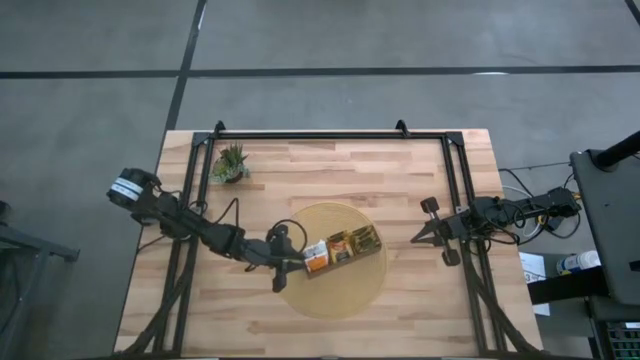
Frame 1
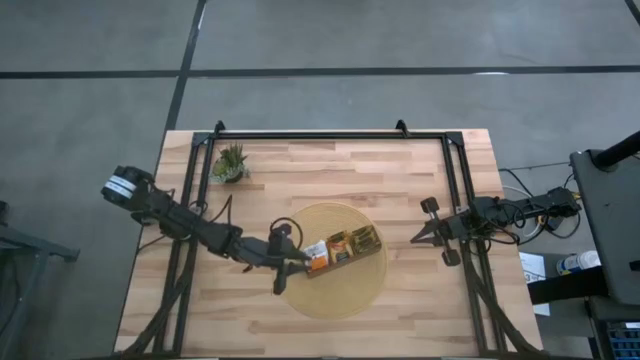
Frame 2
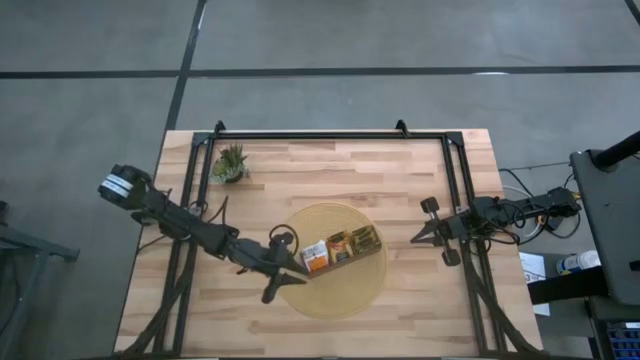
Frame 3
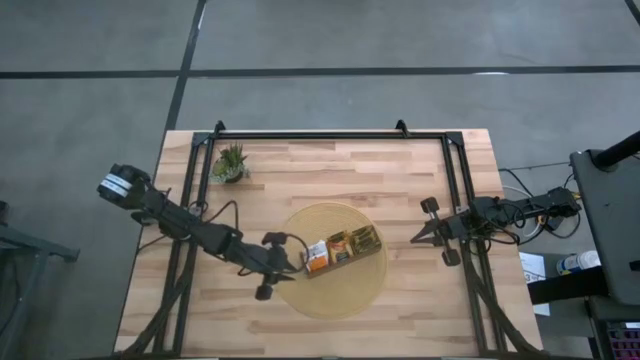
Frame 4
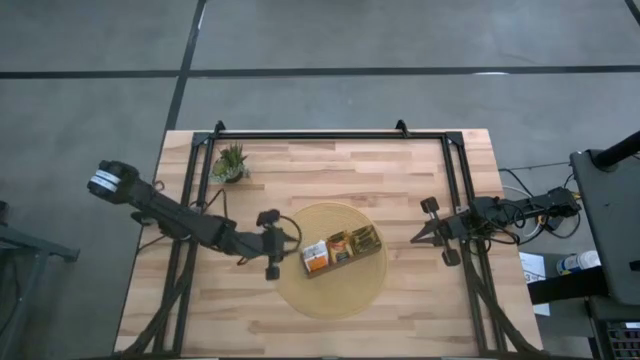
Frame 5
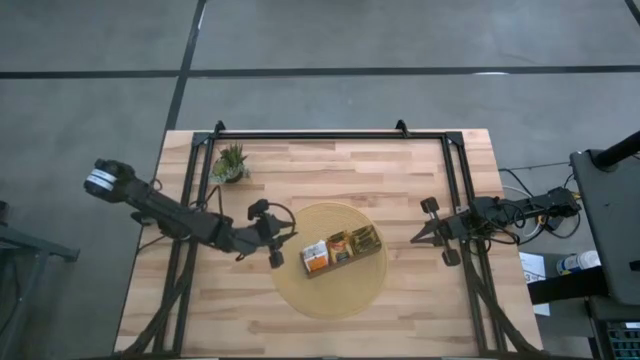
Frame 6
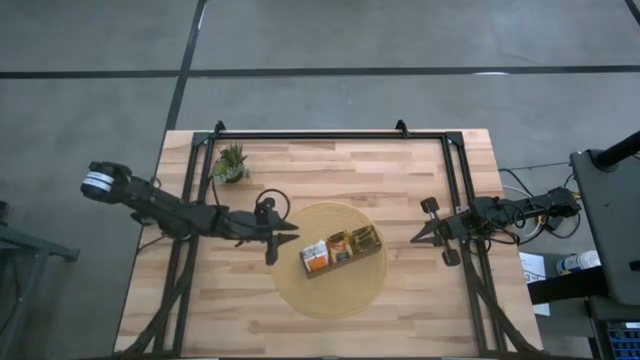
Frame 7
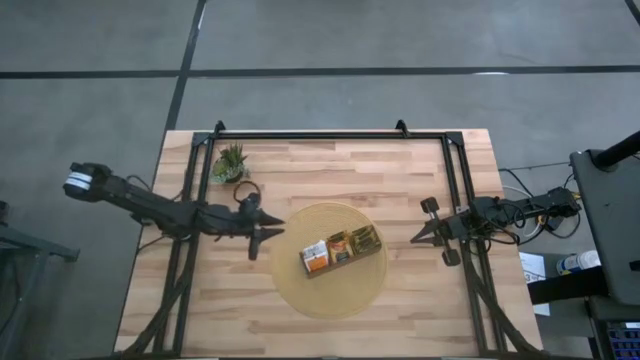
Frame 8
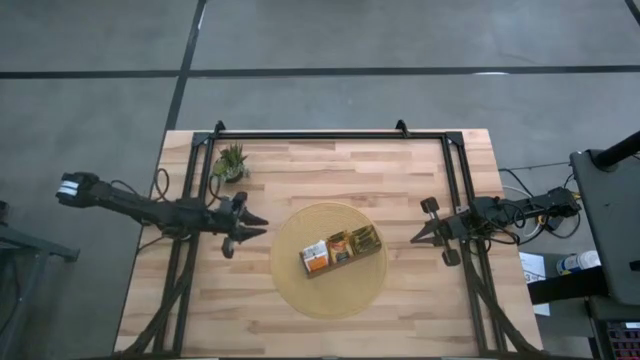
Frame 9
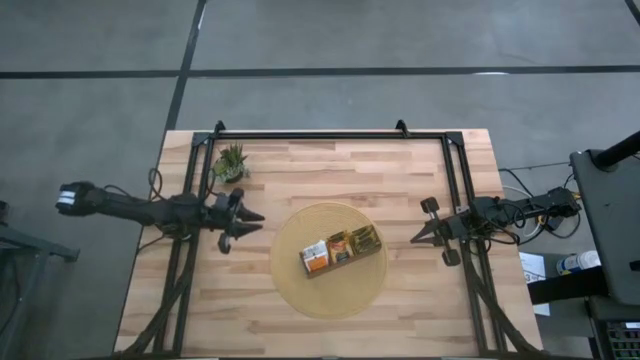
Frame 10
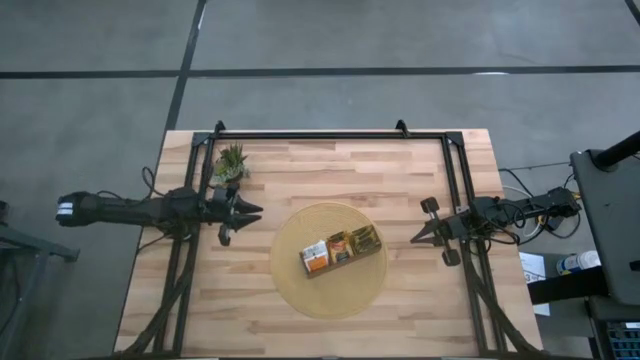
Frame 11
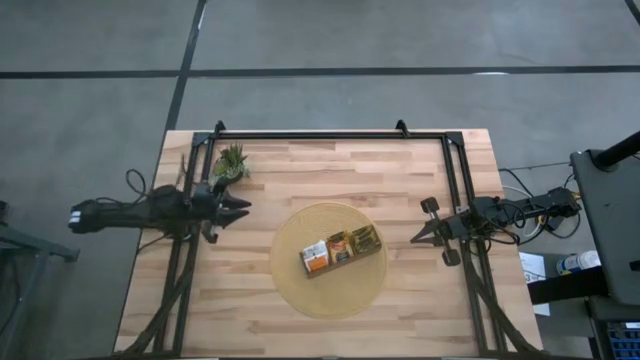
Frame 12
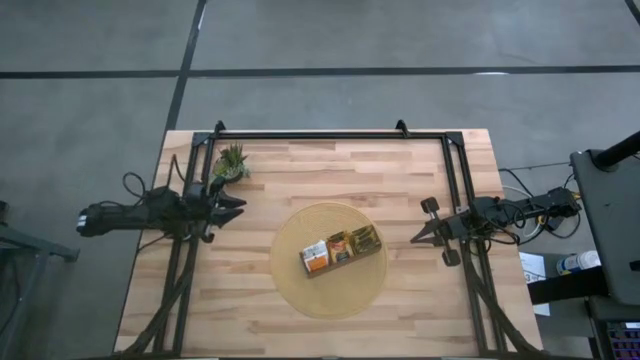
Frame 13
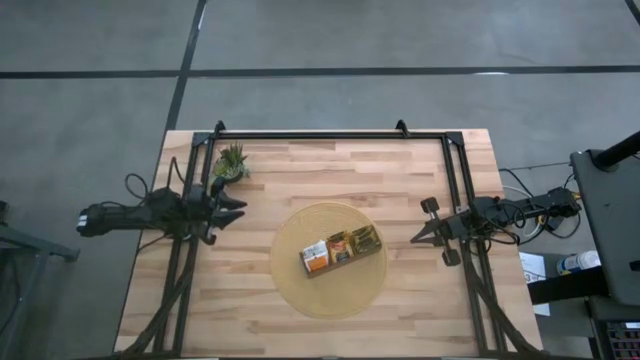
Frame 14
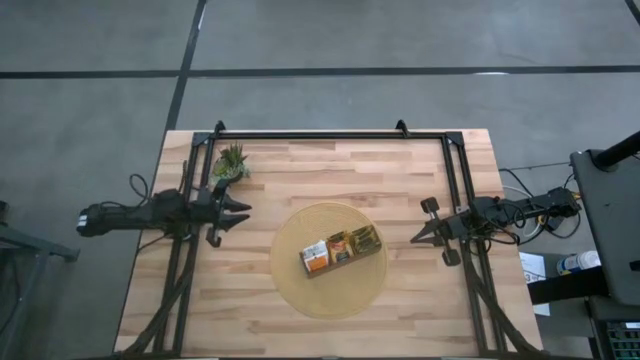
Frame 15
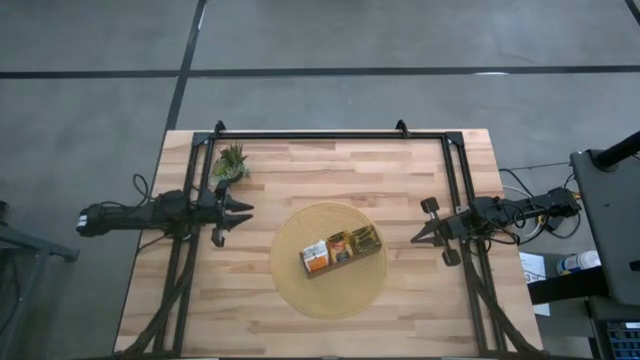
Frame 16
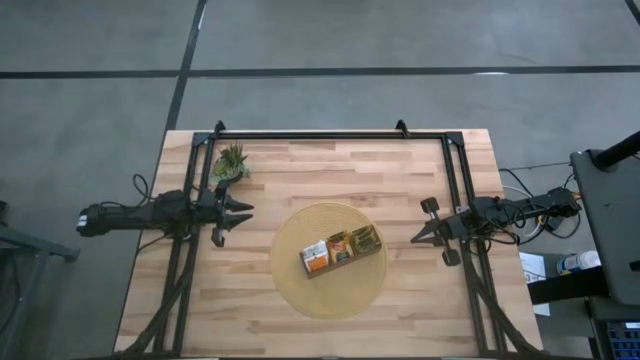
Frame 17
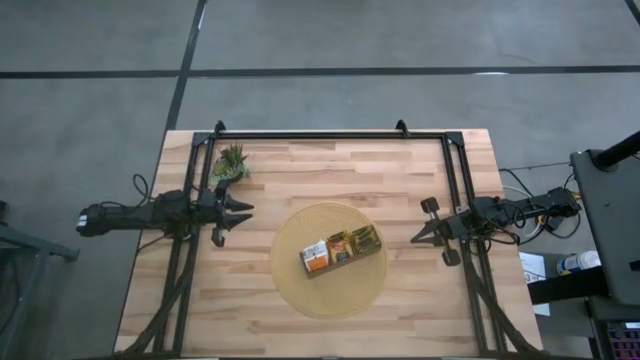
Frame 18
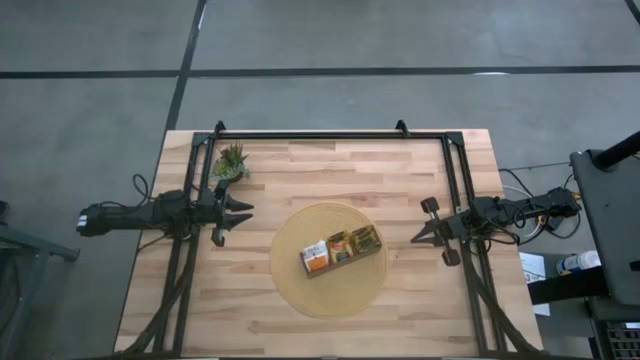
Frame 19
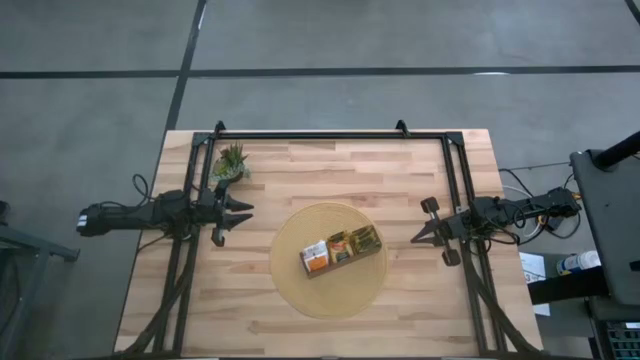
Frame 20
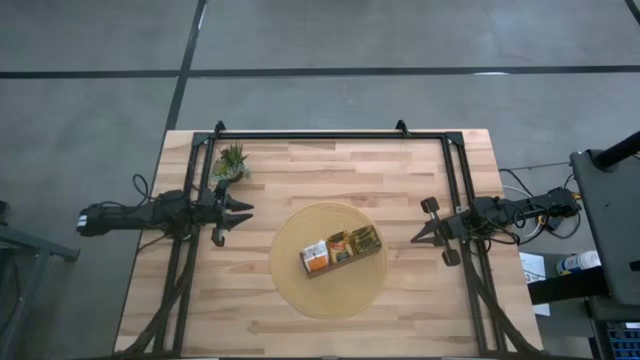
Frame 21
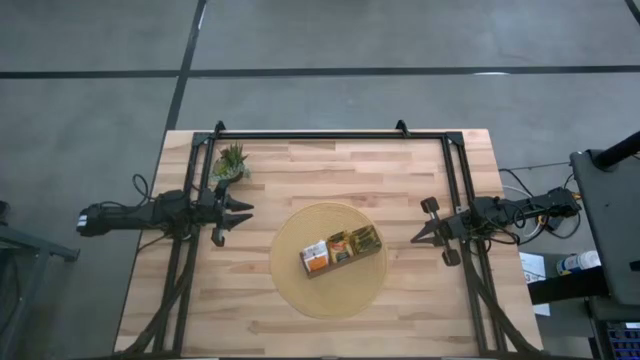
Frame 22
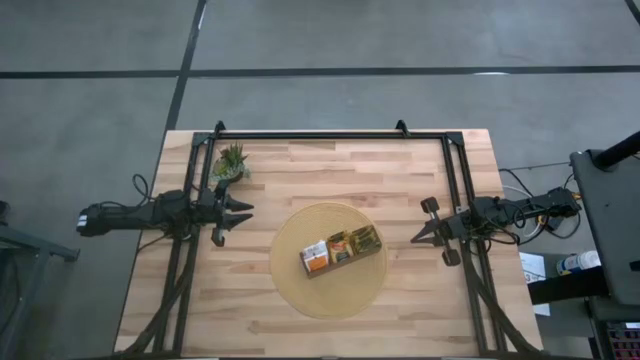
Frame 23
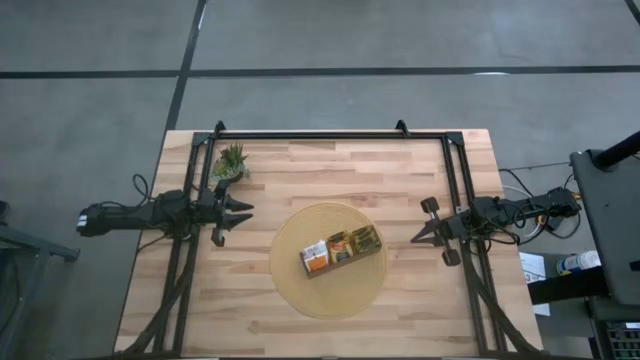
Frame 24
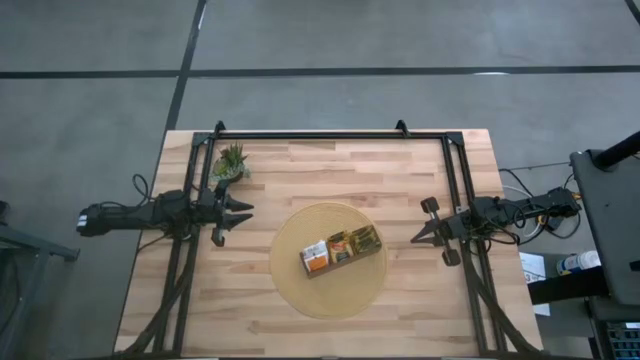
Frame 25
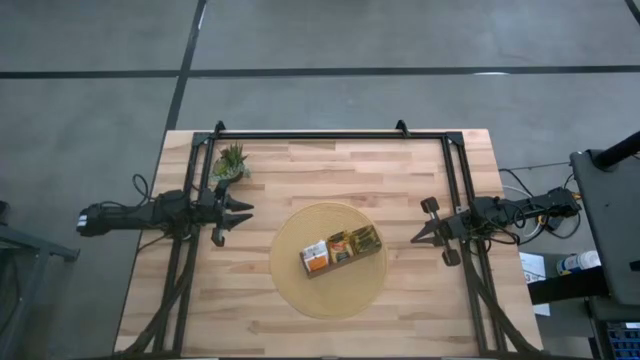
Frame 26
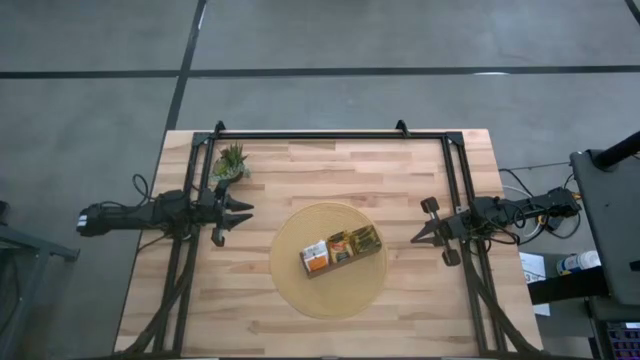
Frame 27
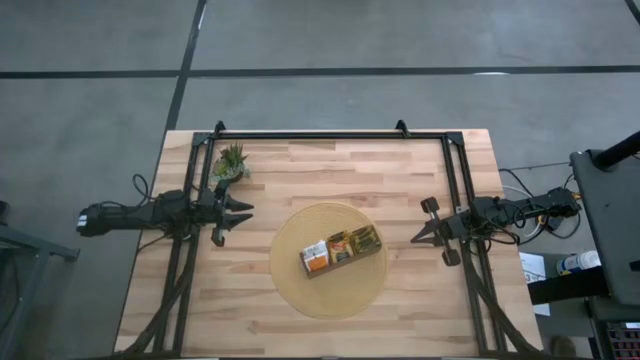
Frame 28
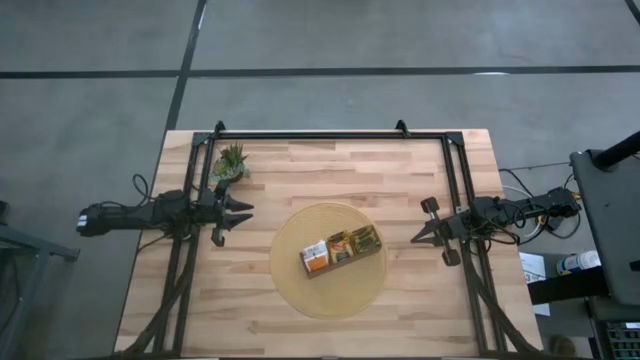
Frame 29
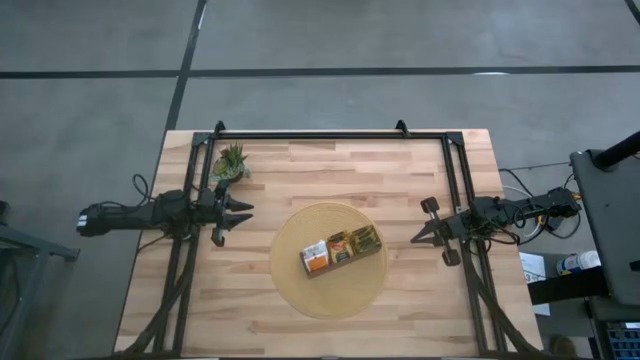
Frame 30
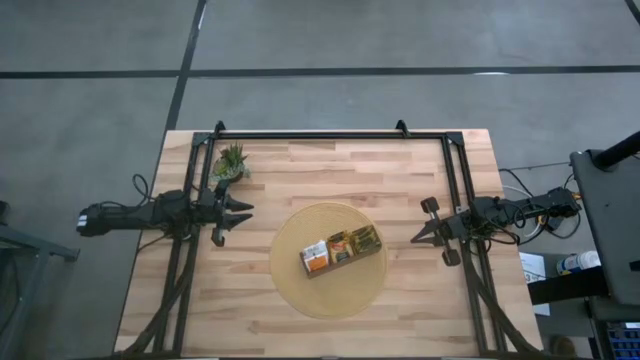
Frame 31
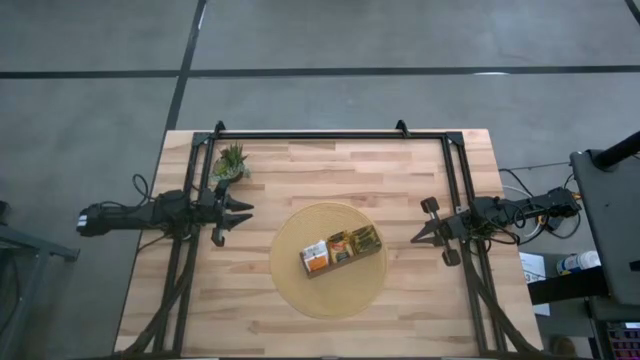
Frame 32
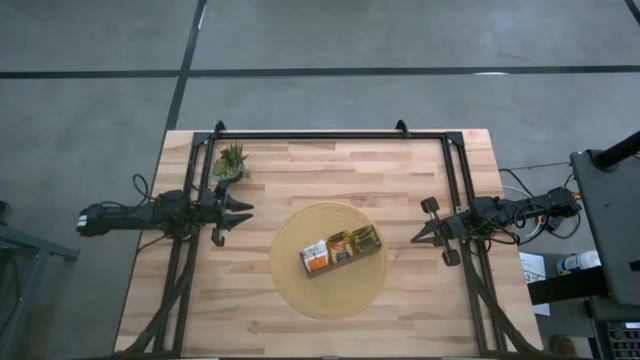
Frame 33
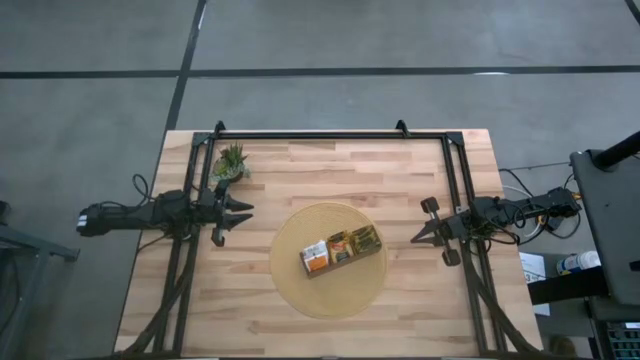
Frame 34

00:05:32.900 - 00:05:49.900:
Task: Pick & Place Tea
Return to Home Position

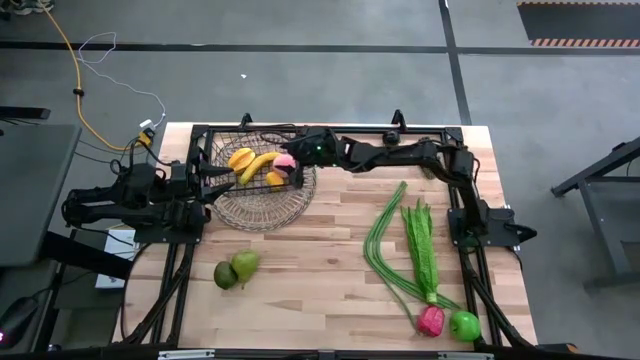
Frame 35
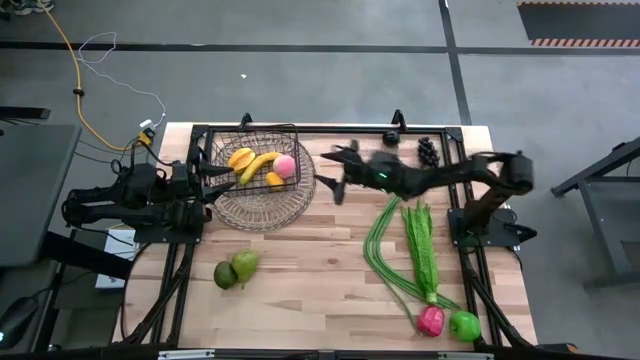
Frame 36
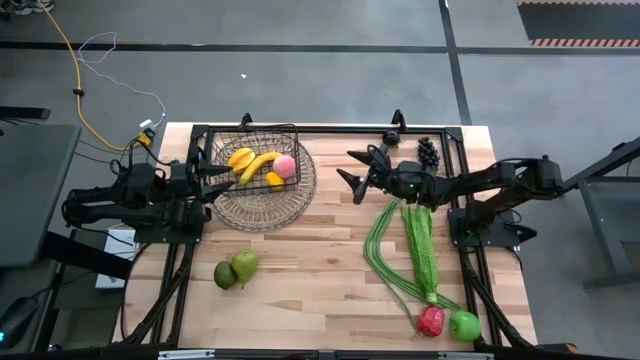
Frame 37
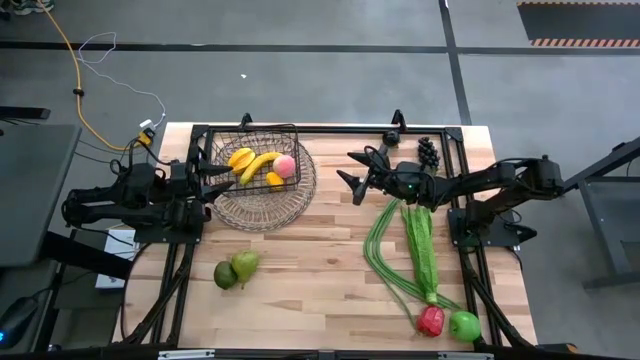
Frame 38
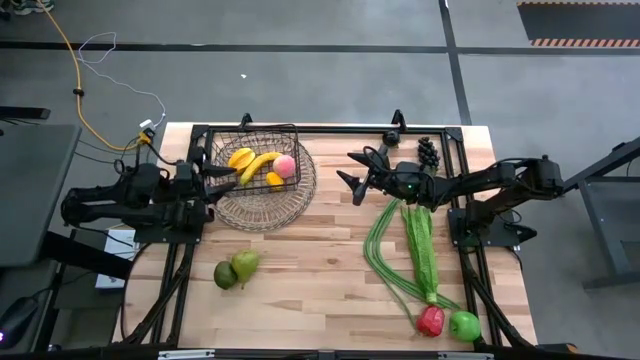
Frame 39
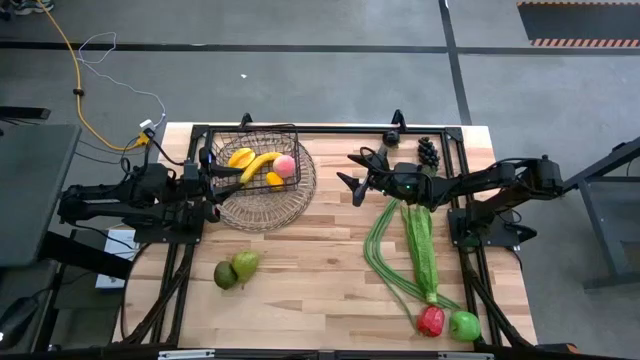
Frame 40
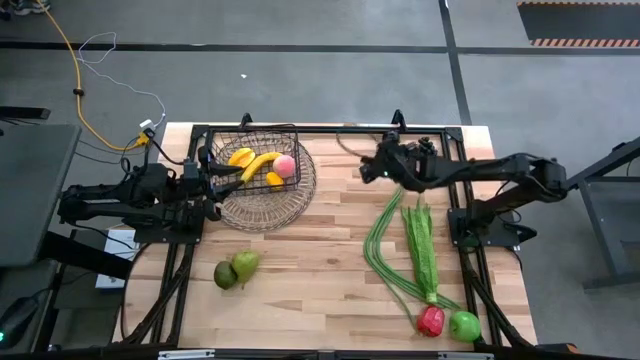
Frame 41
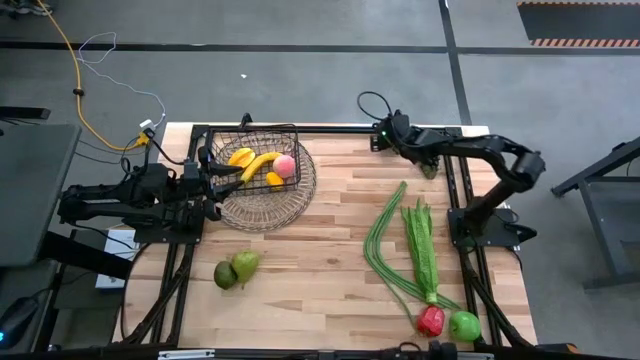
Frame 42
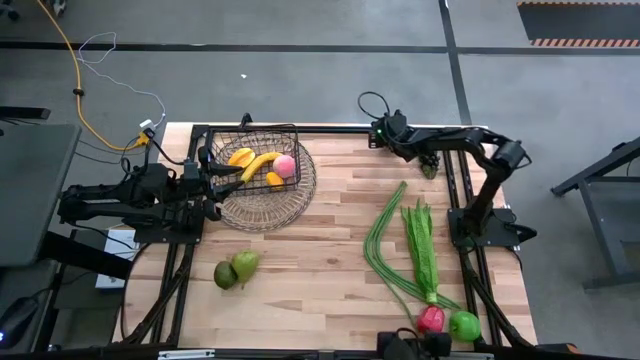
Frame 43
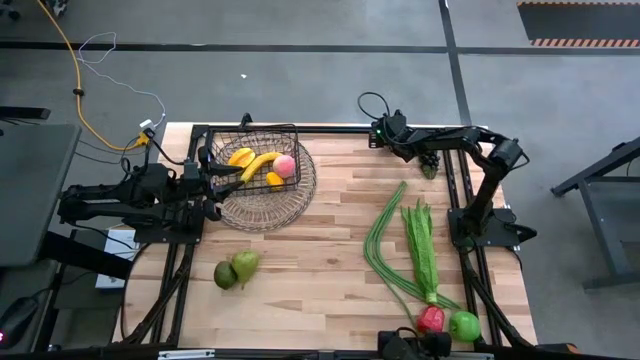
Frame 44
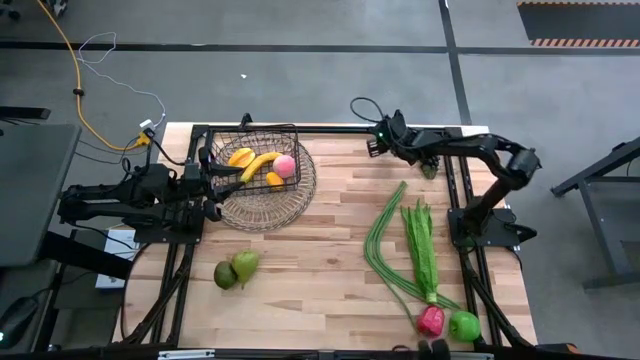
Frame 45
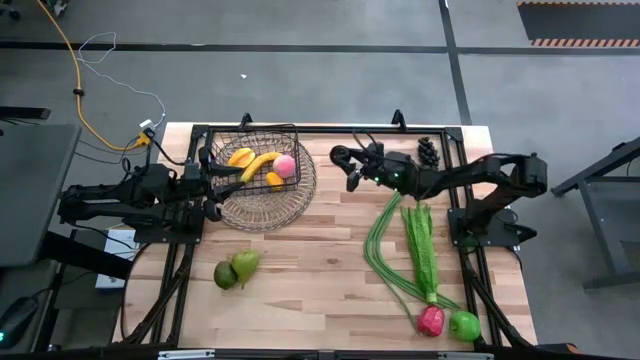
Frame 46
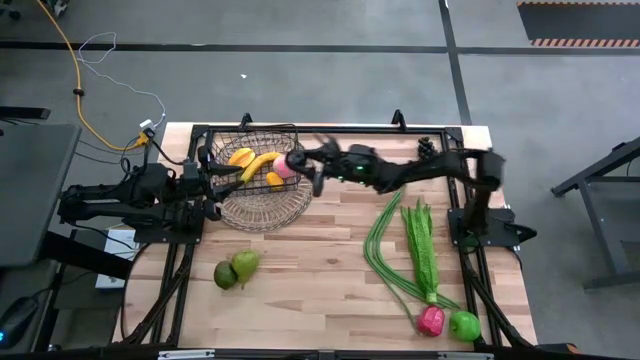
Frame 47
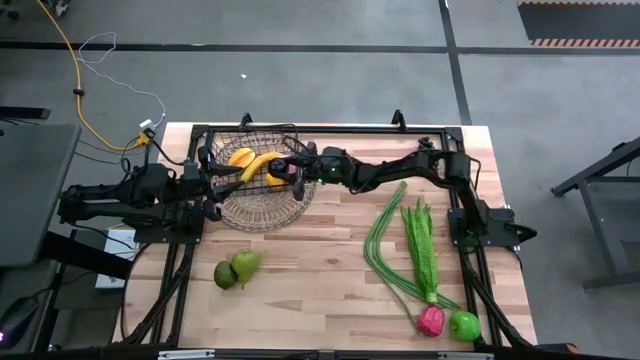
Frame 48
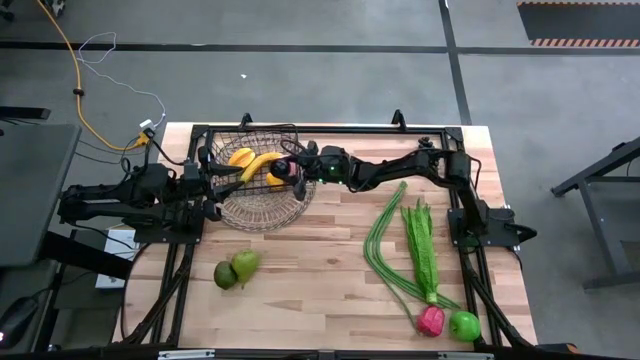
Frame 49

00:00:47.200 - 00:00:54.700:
Task: Build produce basket
Put the black plum into the wire basket
